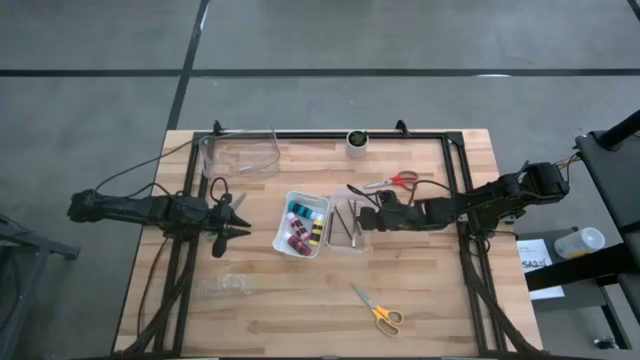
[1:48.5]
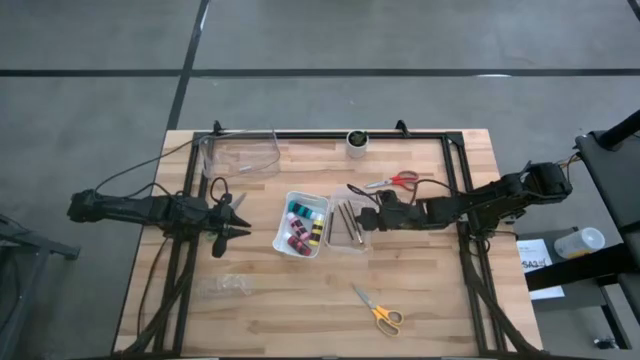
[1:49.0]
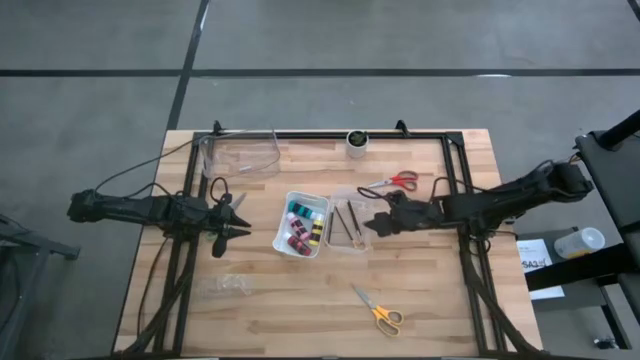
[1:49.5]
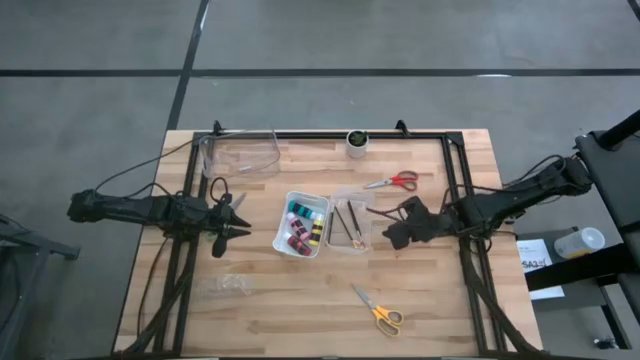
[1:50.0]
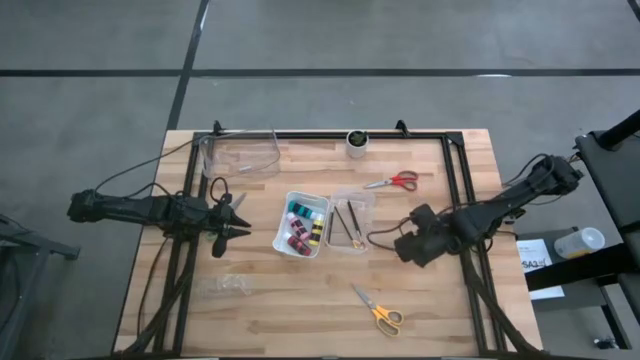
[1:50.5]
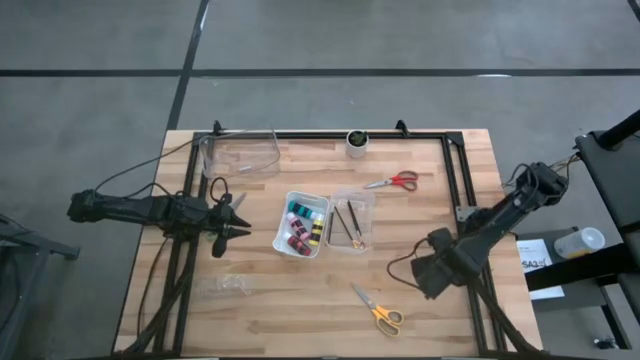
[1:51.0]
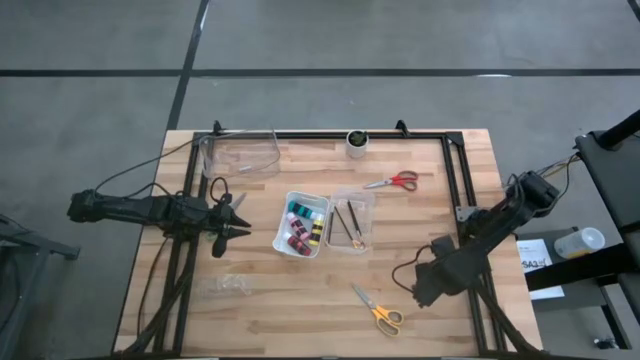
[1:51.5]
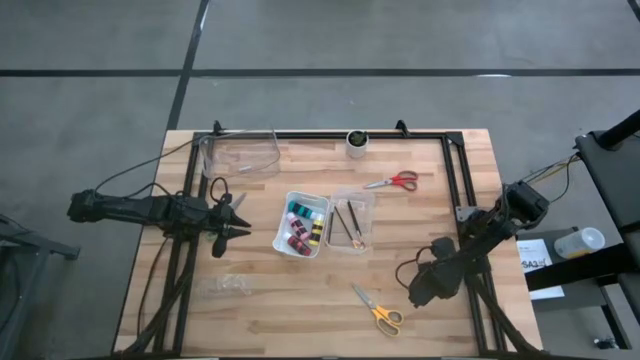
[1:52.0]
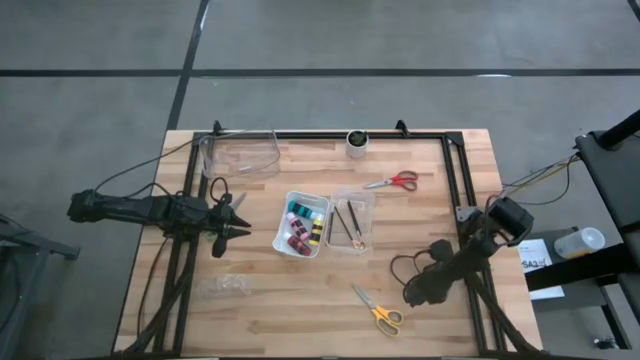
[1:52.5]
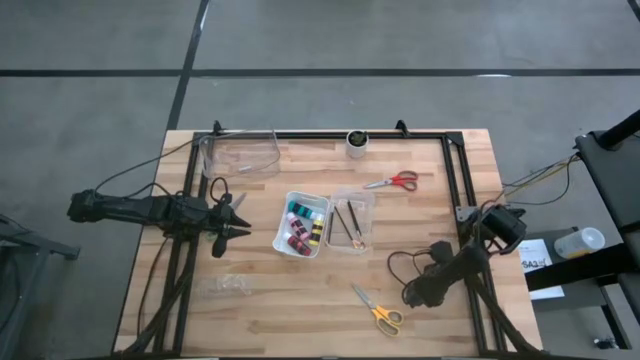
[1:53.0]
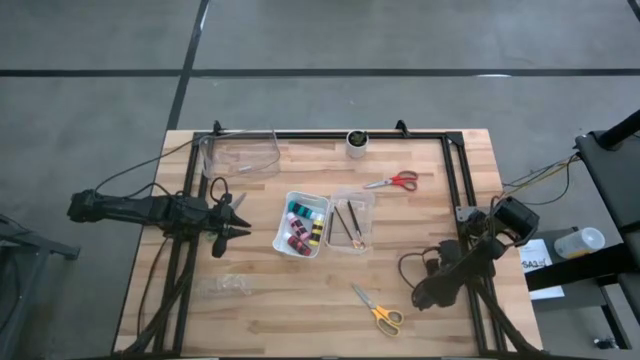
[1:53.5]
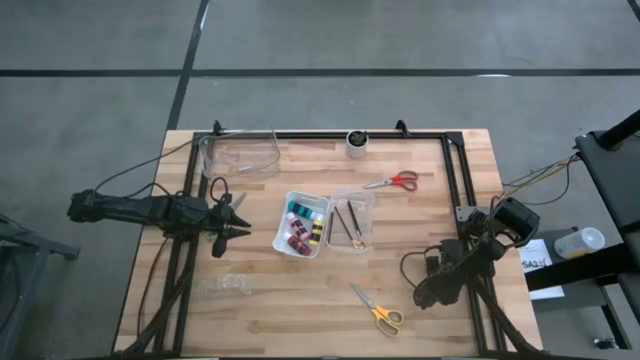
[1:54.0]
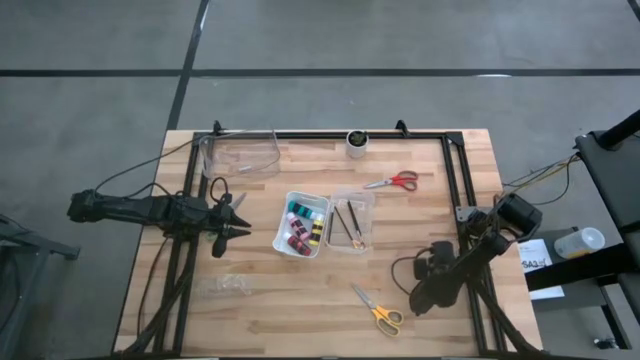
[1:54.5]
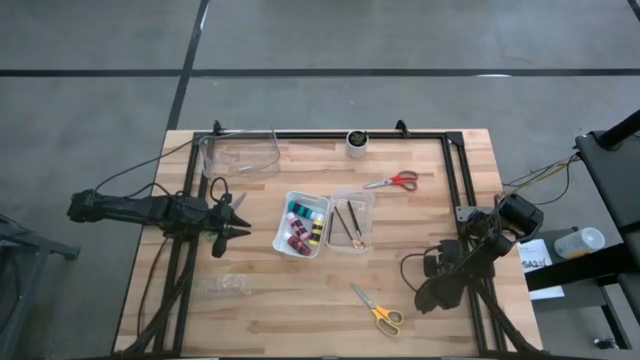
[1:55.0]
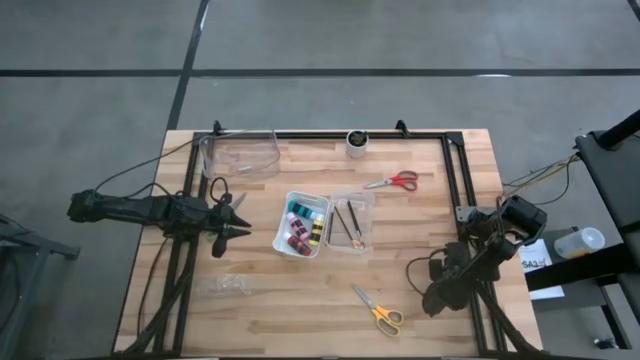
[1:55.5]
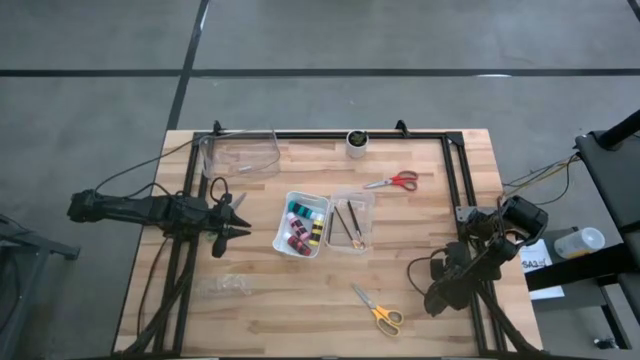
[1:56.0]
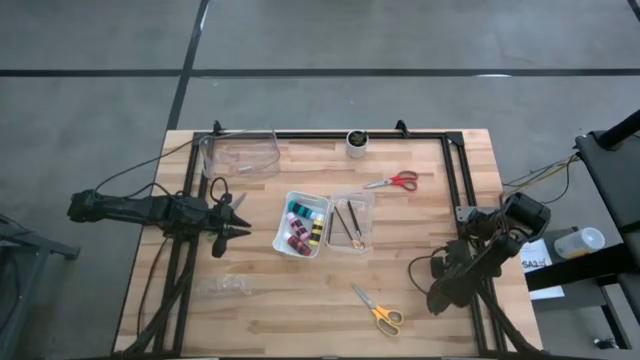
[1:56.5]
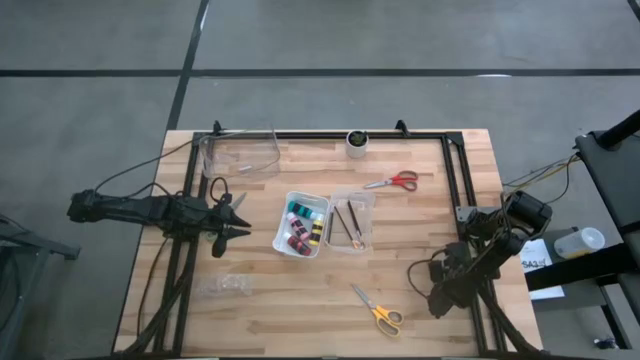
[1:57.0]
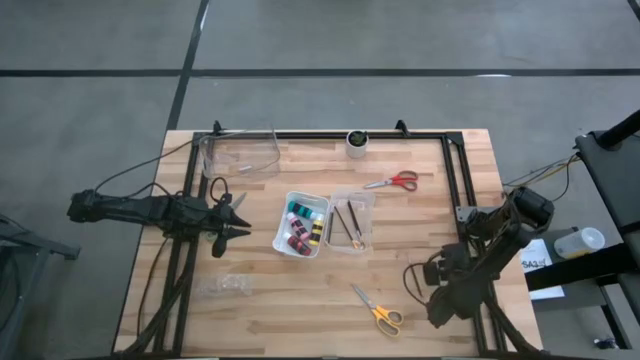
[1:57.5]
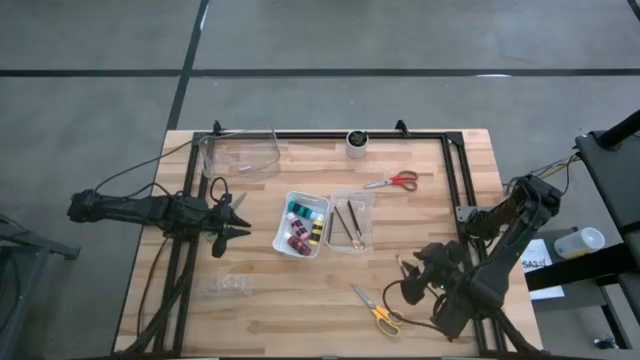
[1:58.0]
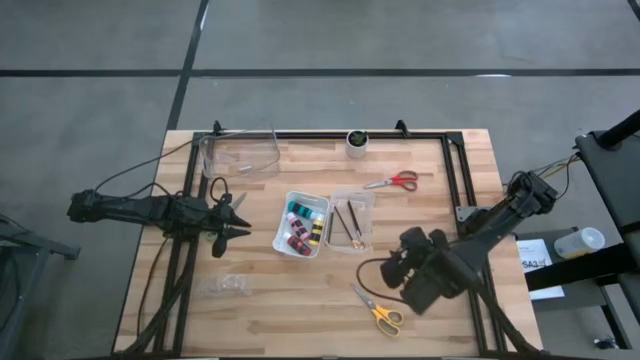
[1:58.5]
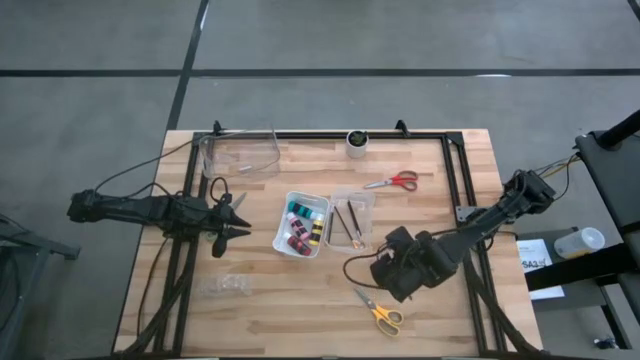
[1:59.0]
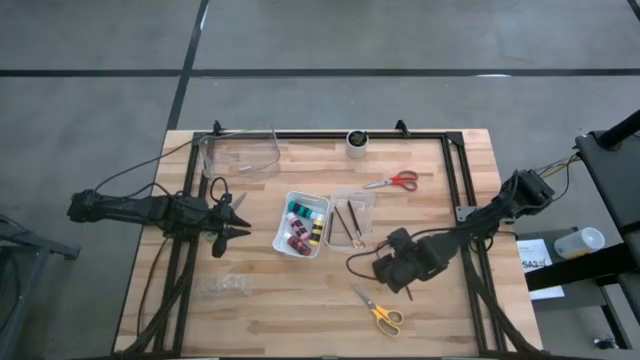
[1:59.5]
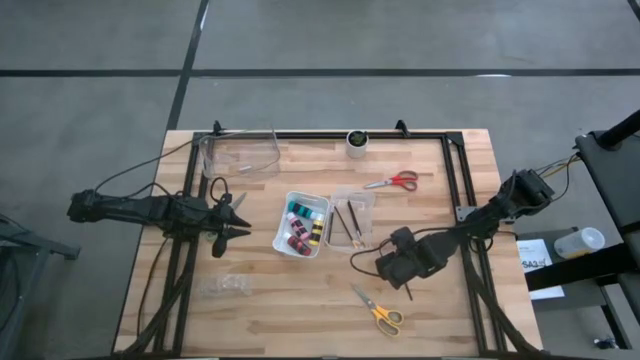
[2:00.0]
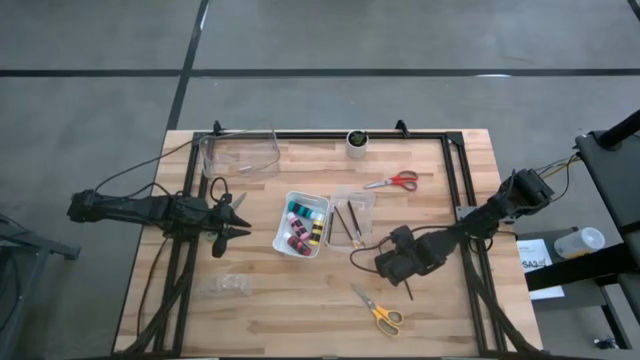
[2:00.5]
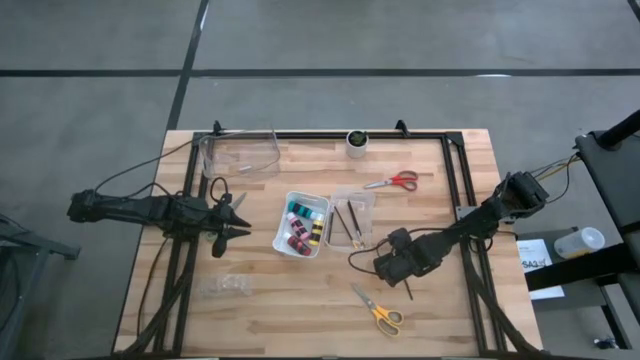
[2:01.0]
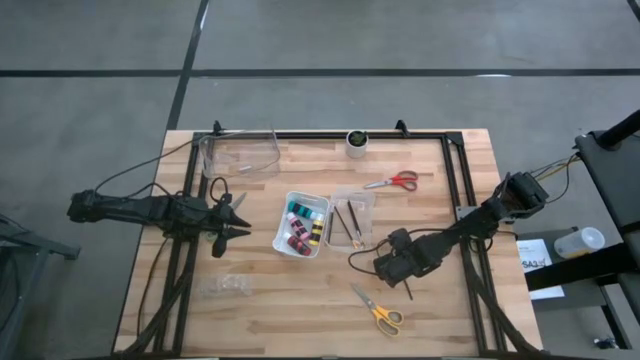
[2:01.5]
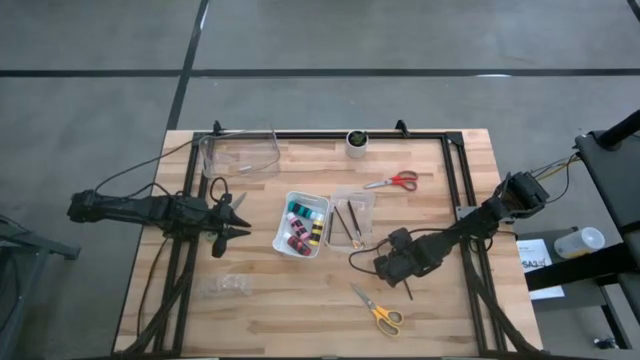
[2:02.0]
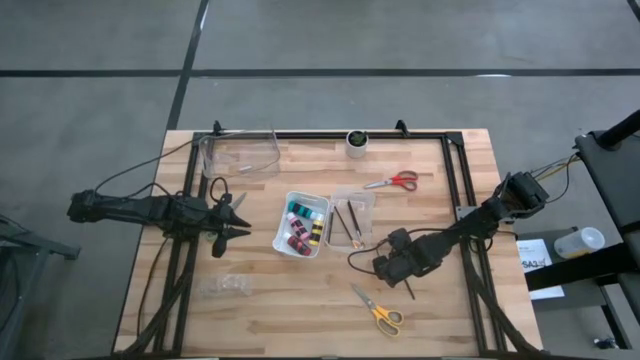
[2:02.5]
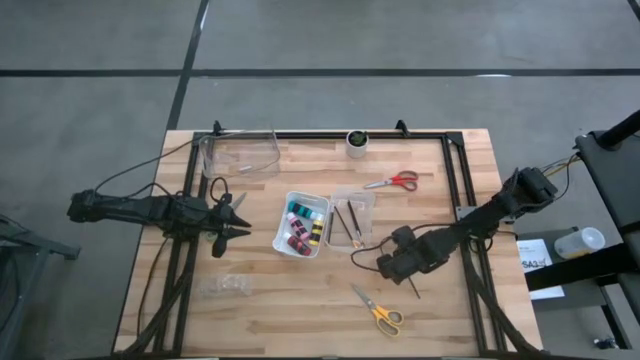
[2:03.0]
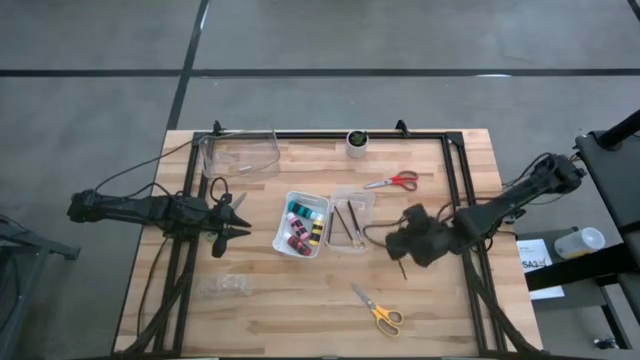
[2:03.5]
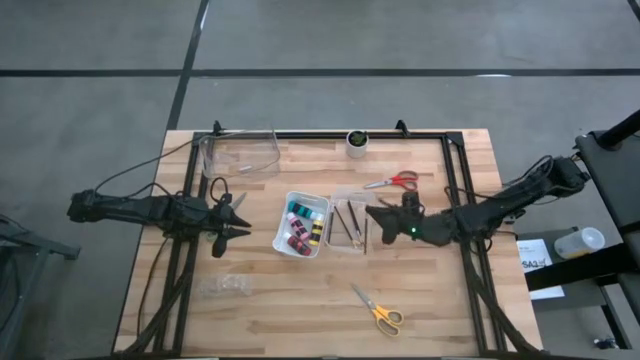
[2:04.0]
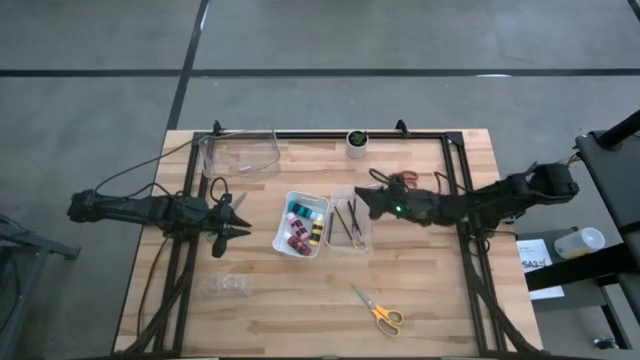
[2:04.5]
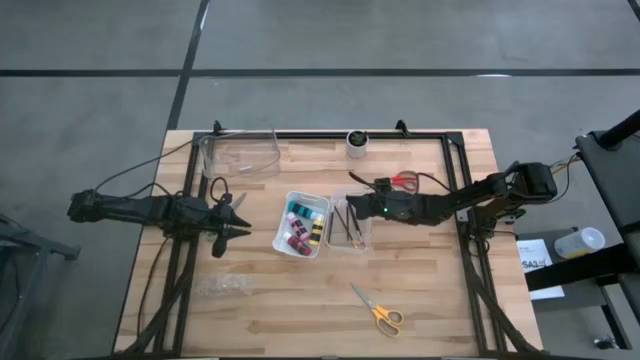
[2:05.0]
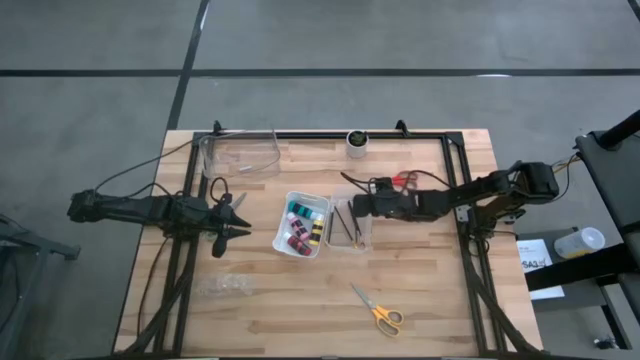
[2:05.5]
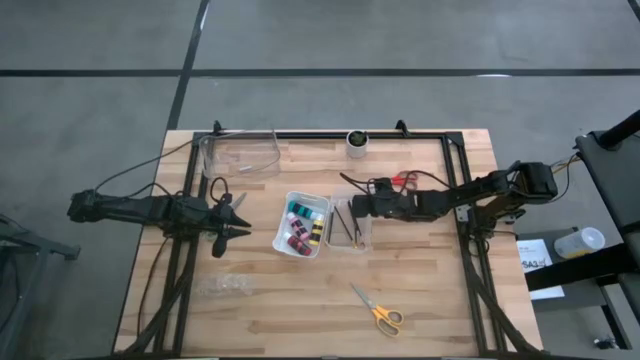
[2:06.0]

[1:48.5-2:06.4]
Task: Pick & Place Paint Supplies
Put the silver paint brush into the bottom transparent bin

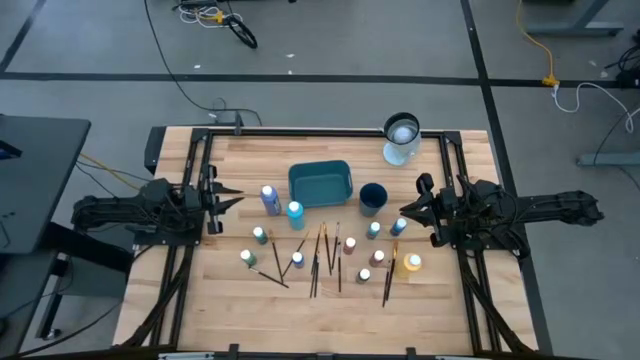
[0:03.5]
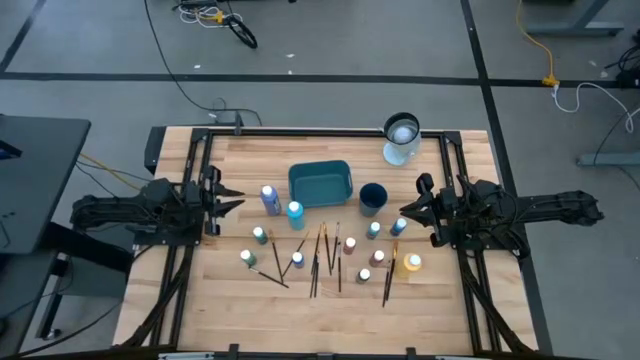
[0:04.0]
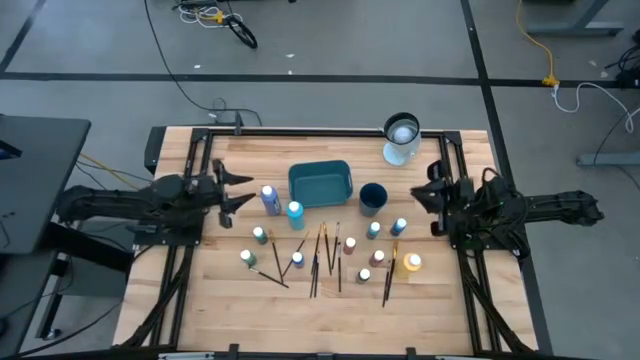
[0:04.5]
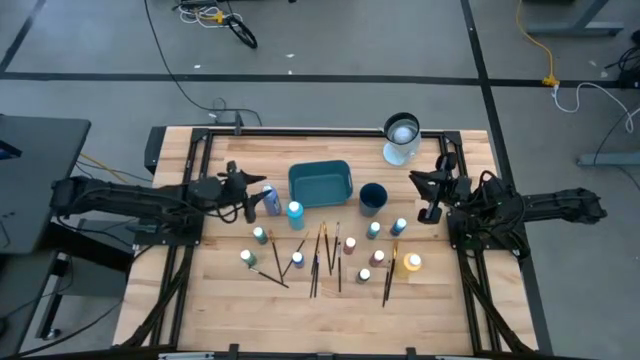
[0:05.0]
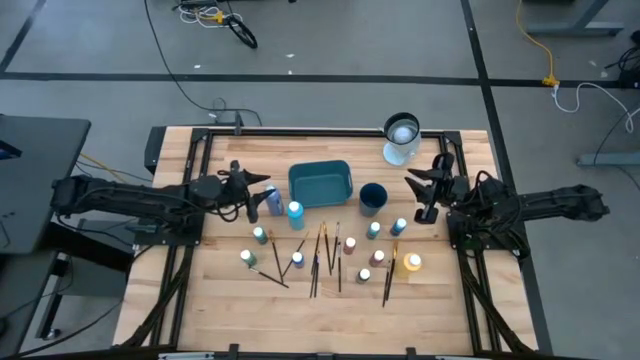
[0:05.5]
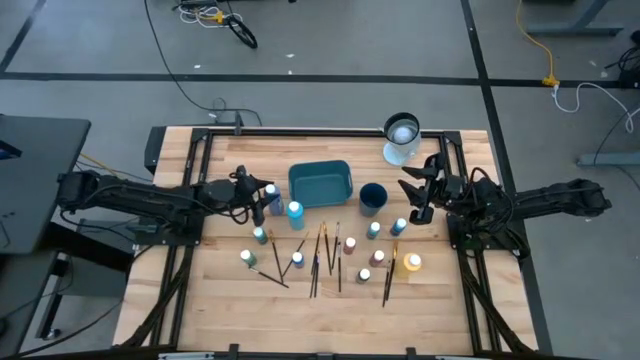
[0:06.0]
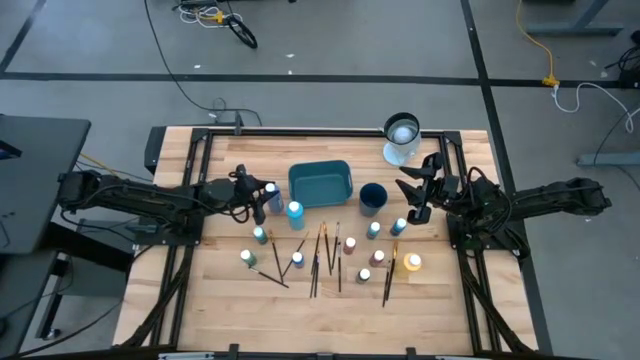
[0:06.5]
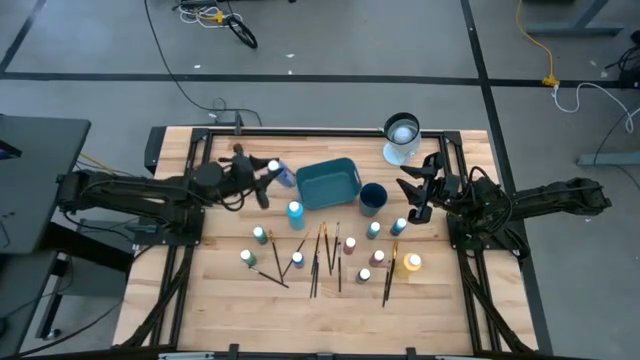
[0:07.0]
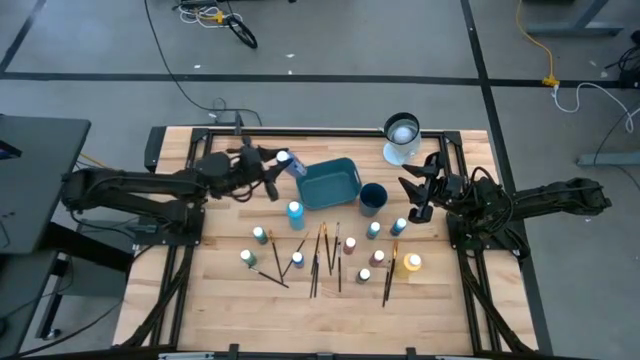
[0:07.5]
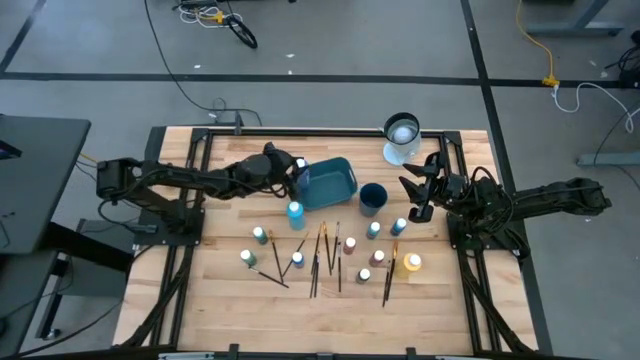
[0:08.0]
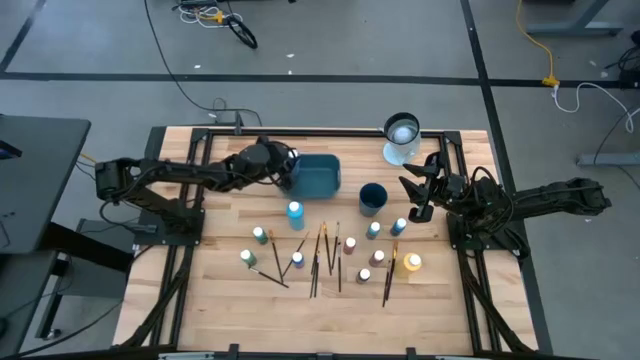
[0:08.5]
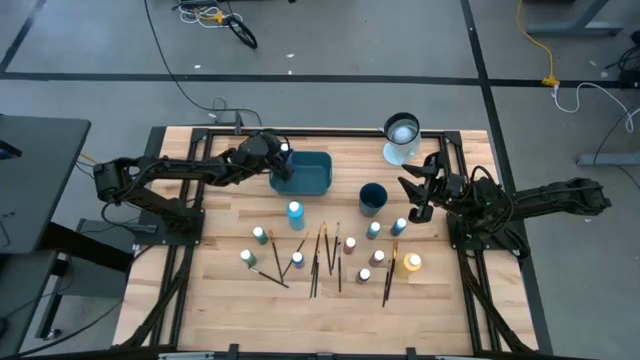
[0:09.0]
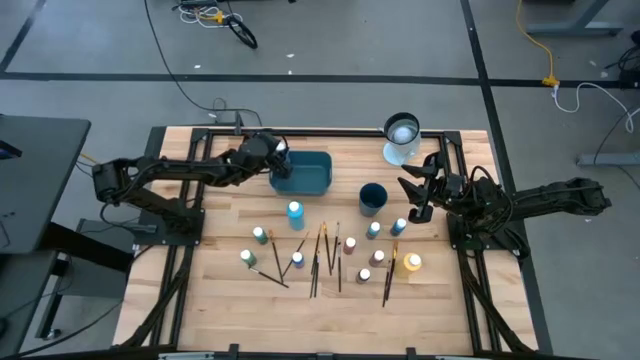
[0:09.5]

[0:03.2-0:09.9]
Task: Pick & Place Paint Supplies
Put the purple paint bottle into the blue bin
